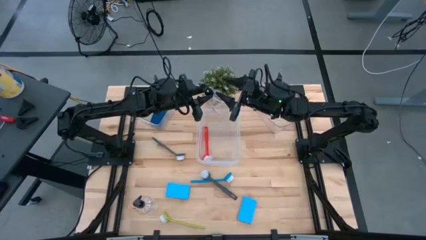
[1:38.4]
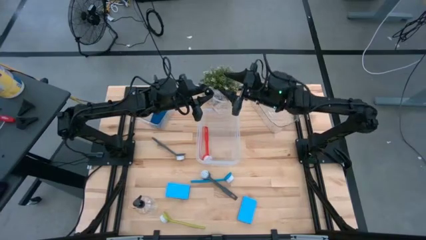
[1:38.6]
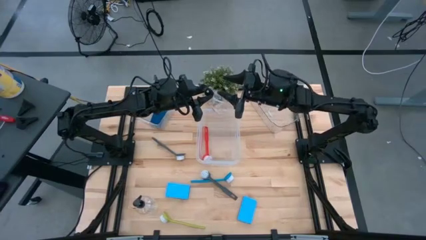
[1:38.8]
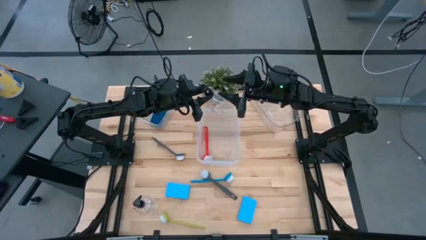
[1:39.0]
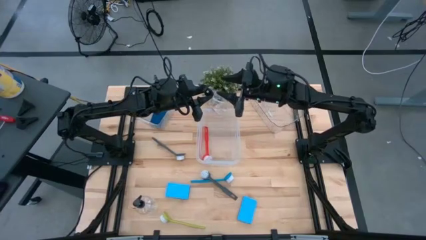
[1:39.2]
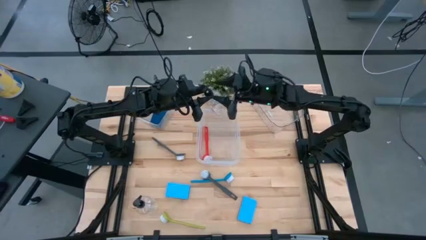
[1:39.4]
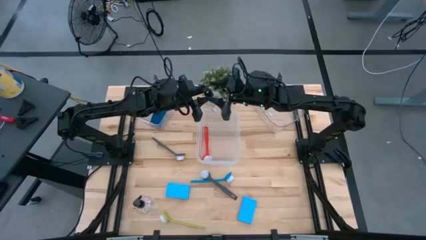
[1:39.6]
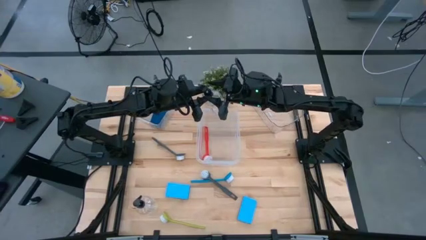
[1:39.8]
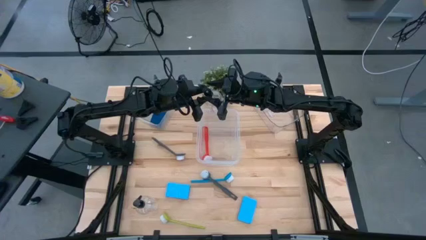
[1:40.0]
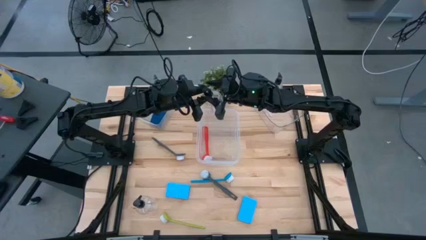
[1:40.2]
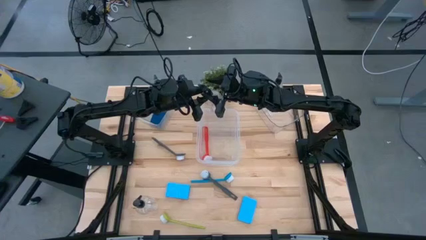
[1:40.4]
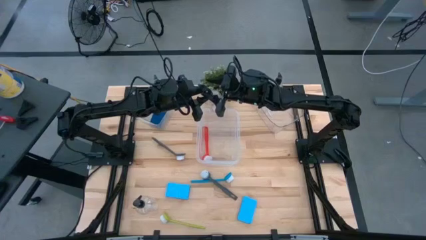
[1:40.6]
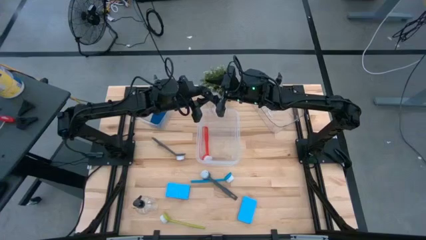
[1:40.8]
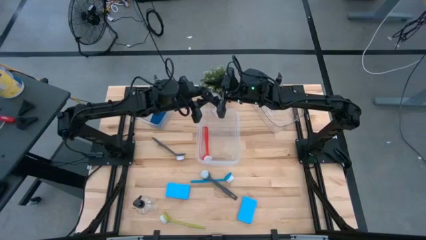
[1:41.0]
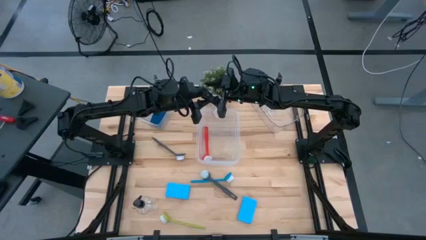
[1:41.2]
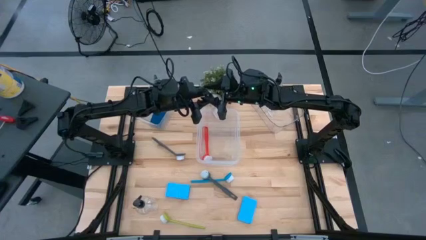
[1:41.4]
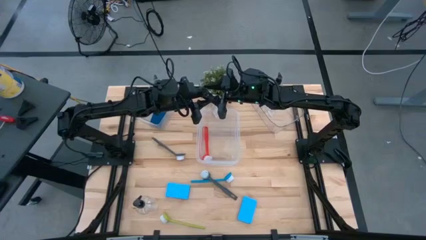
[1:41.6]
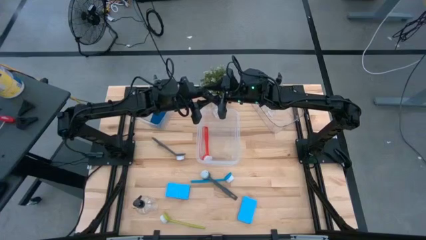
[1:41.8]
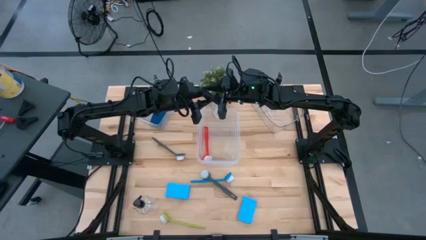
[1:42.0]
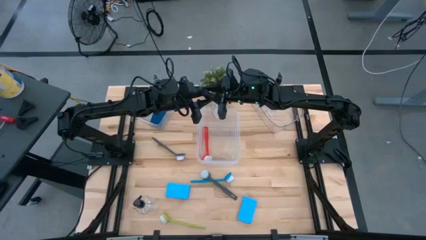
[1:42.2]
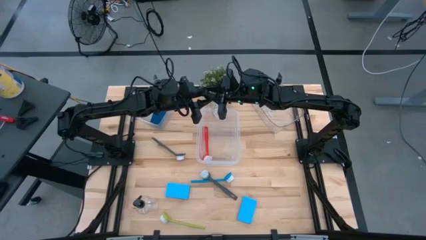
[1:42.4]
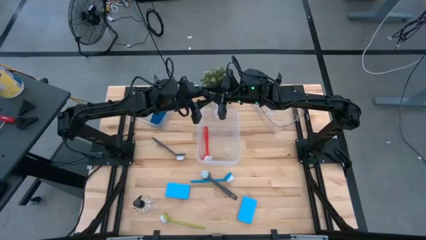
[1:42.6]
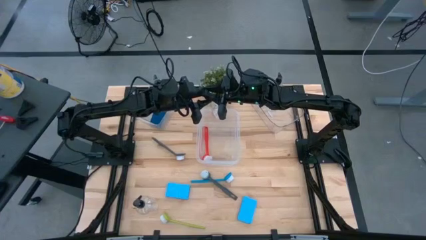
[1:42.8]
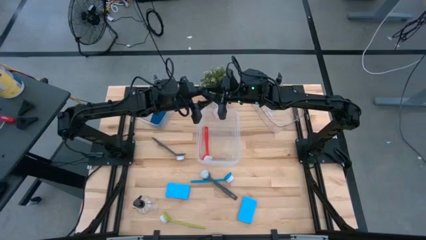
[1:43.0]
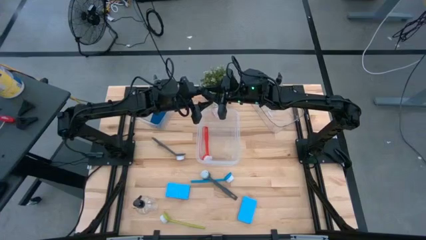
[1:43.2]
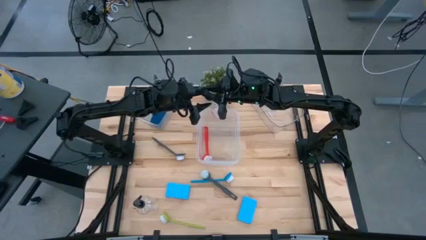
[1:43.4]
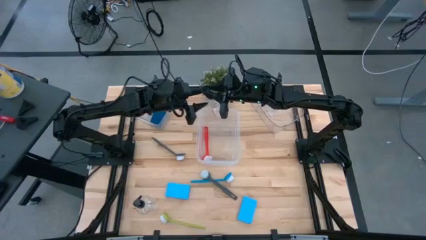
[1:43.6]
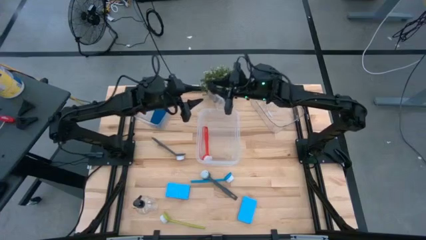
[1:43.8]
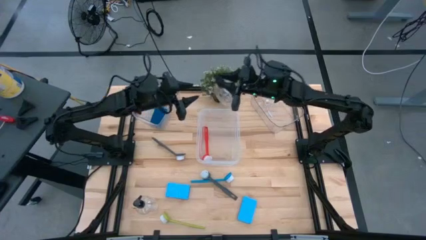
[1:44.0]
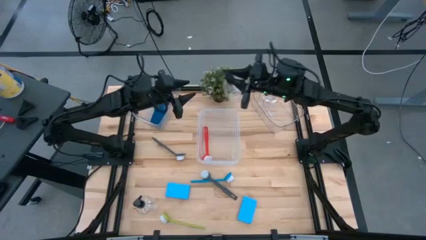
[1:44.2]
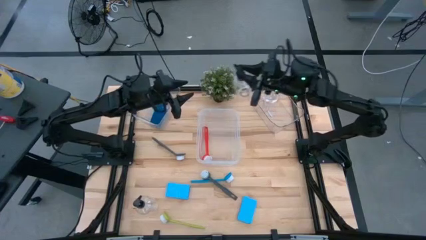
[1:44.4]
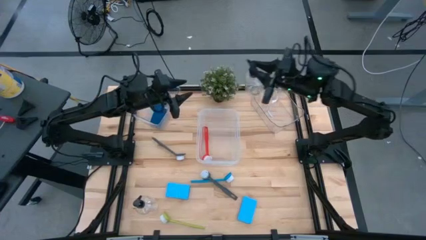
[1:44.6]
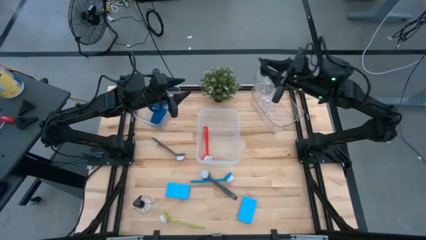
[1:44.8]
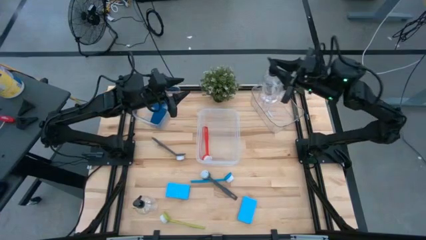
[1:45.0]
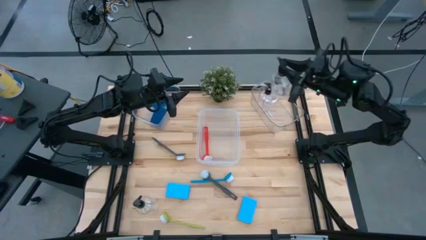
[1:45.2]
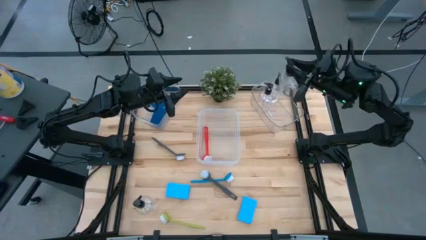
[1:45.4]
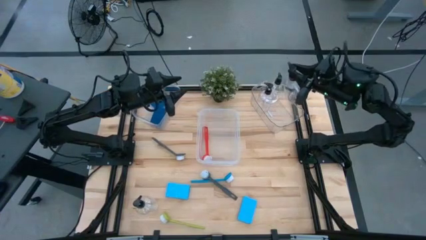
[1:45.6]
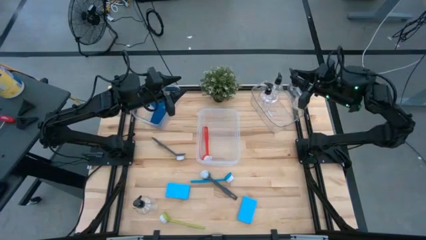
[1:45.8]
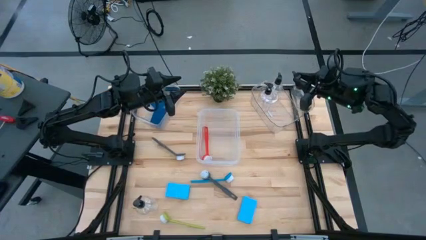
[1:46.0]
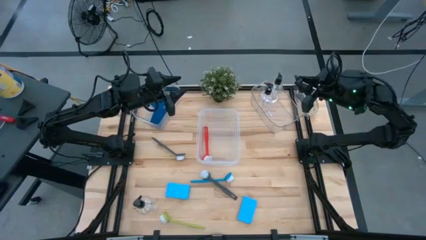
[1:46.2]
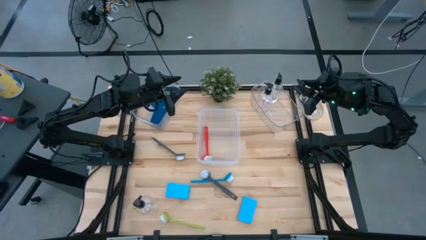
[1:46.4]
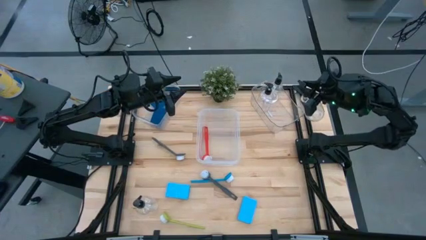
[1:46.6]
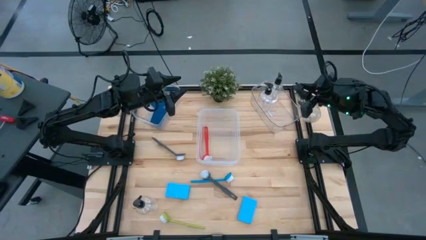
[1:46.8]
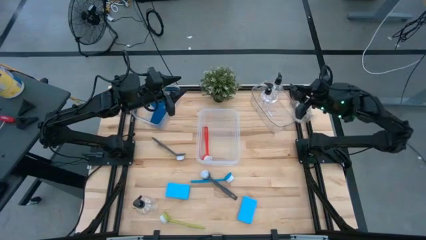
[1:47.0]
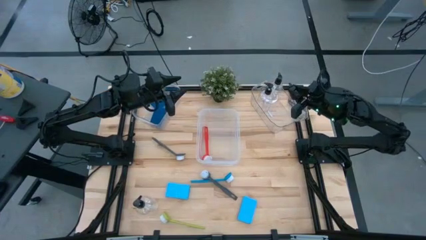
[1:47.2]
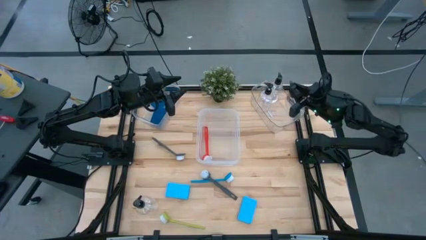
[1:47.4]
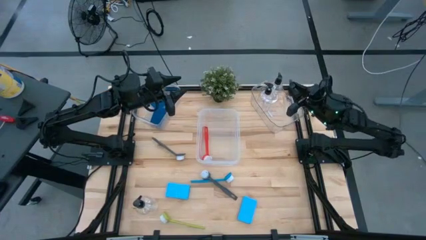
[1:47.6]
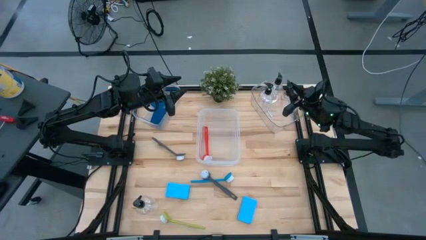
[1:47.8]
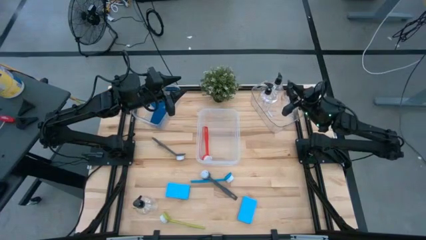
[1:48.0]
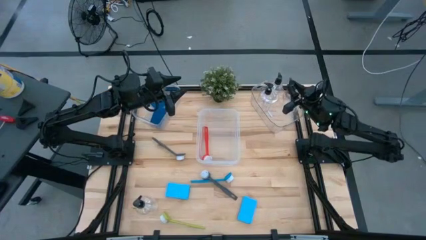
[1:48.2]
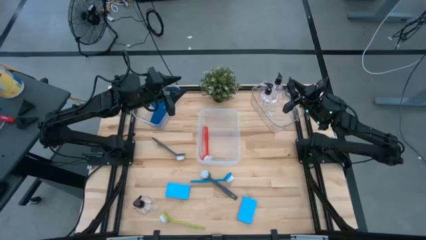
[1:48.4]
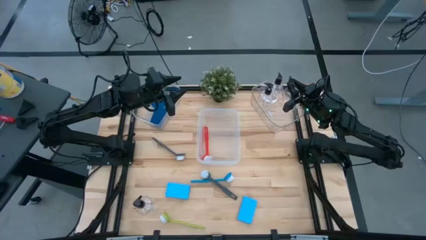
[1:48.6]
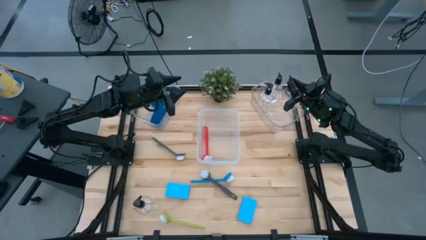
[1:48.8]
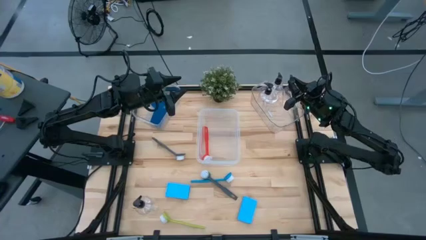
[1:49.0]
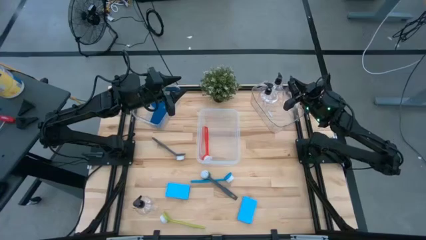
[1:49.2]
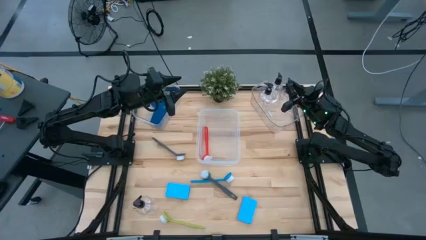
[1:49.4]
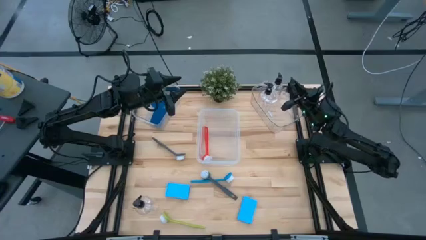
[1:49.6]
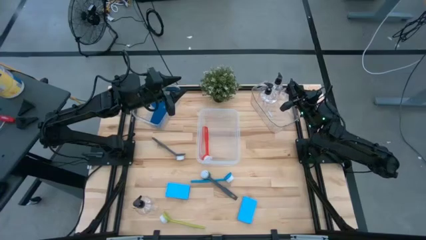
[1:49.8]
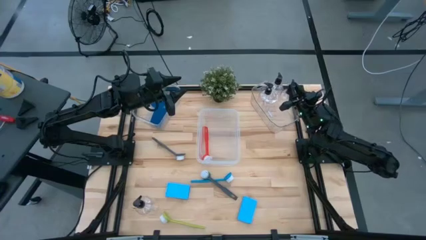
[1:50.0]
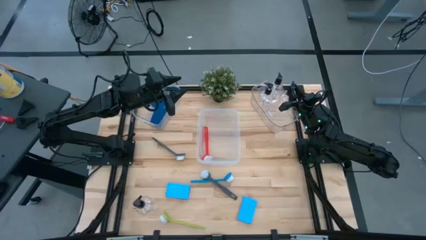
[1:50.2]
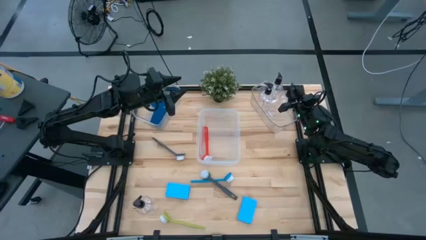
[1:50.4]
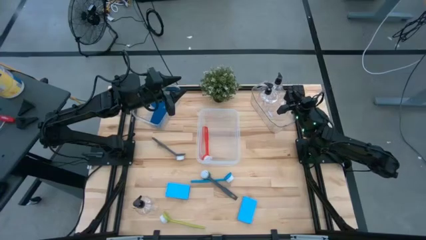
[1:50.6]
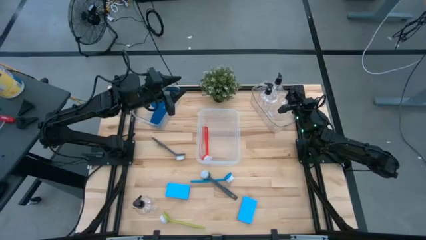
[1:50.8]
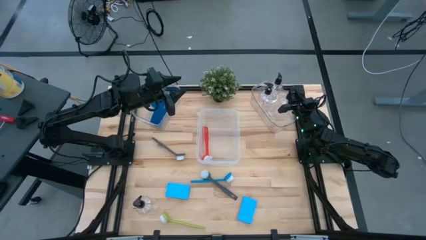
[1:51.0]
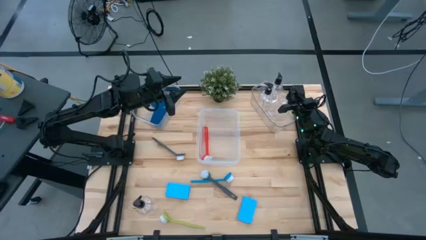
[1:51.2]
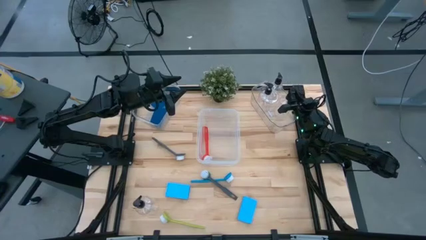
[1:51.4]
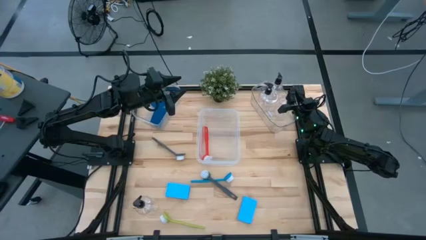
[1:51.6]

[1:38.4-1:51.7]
Task: Pick & Place Kitchen Sink Supplies
Put the black soap dispenser into the right transparent bin
